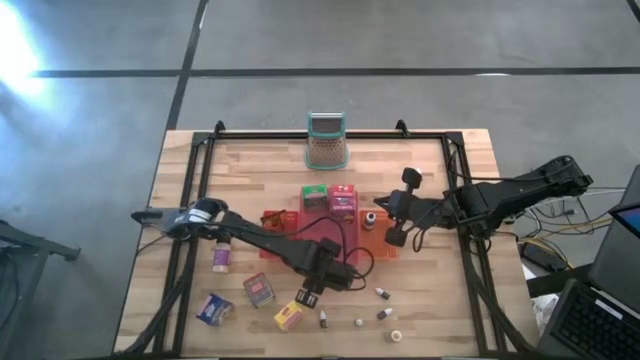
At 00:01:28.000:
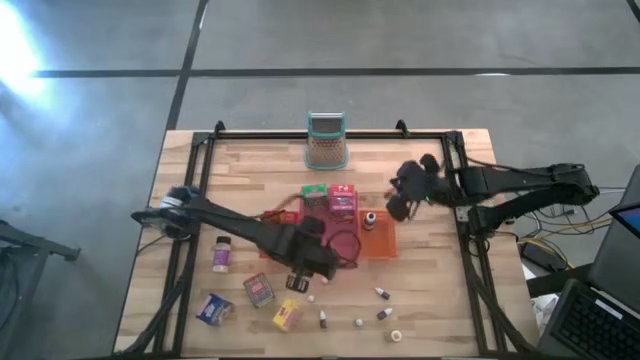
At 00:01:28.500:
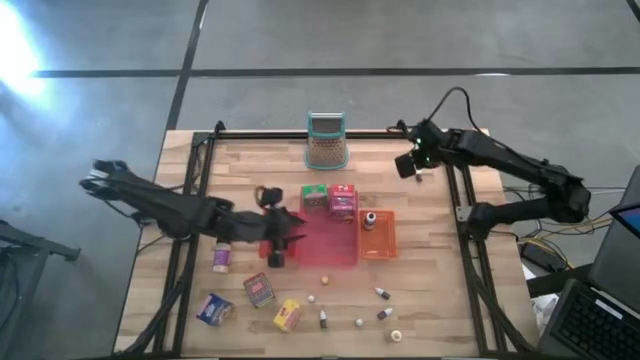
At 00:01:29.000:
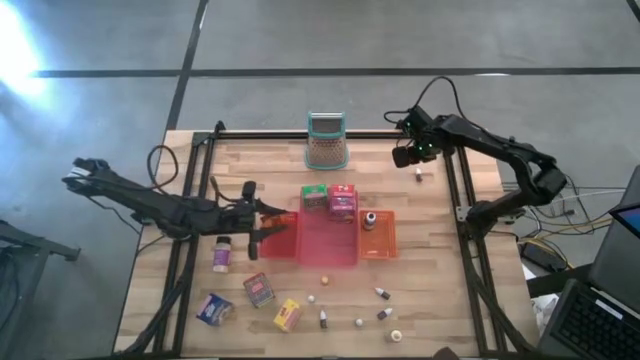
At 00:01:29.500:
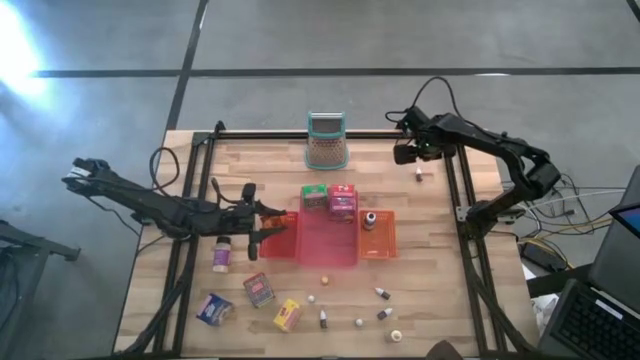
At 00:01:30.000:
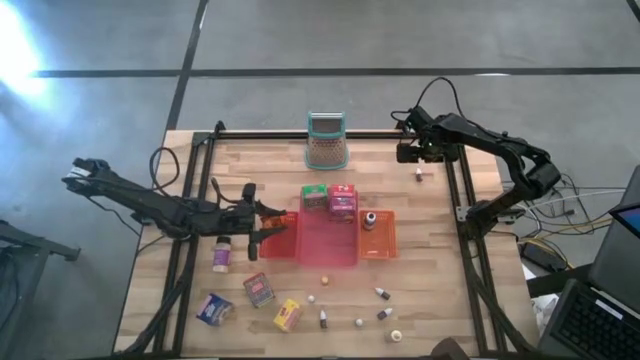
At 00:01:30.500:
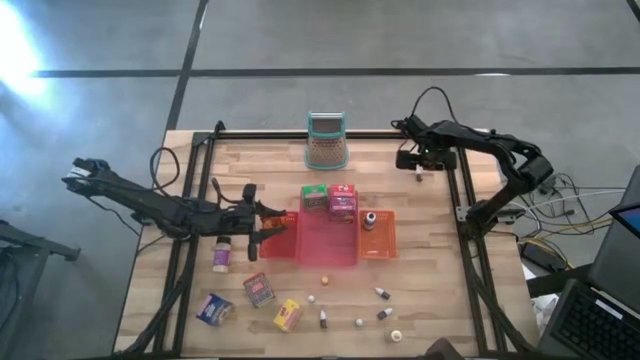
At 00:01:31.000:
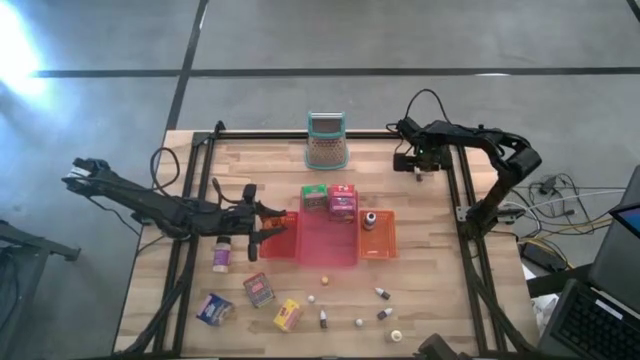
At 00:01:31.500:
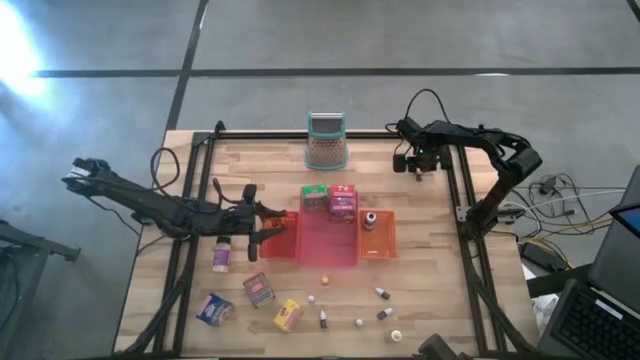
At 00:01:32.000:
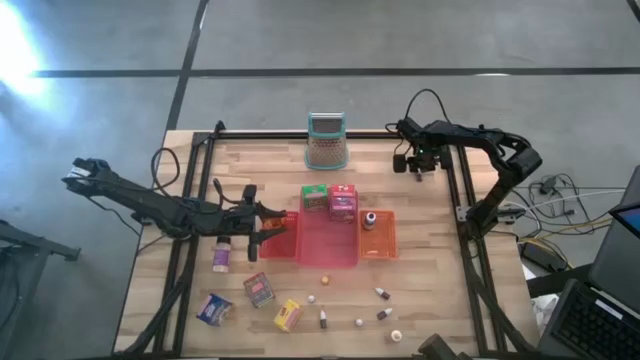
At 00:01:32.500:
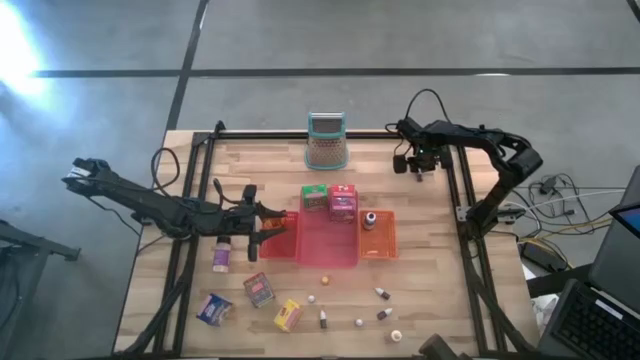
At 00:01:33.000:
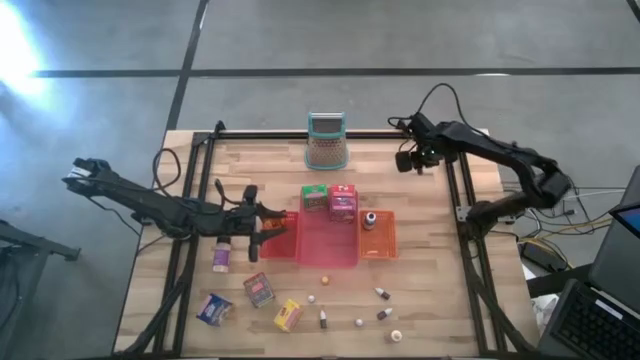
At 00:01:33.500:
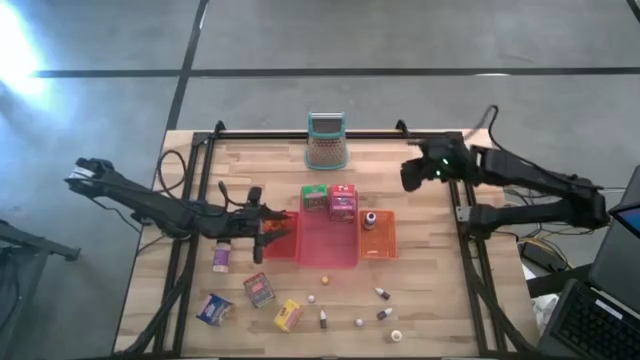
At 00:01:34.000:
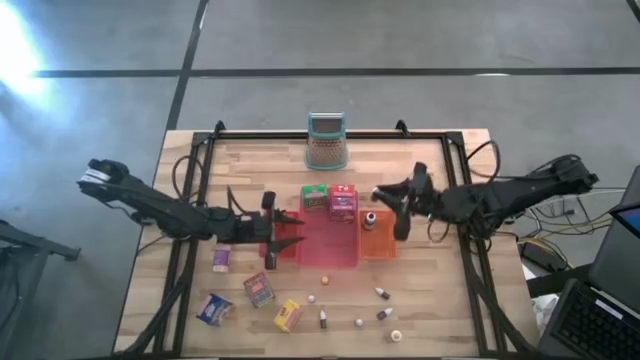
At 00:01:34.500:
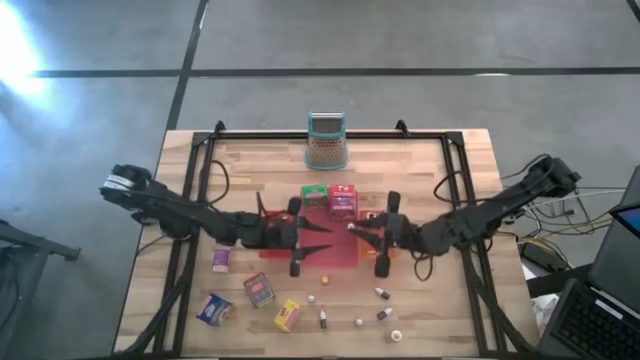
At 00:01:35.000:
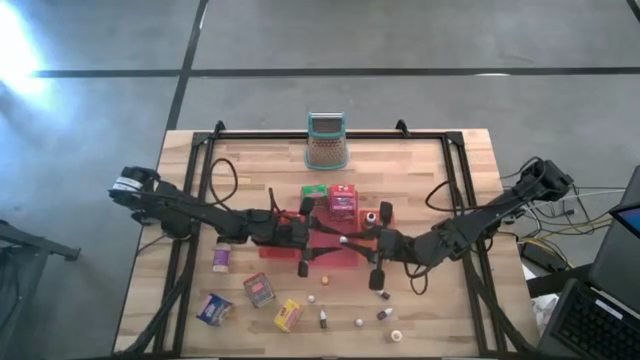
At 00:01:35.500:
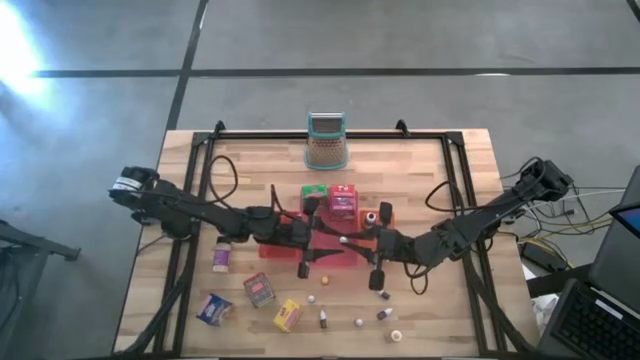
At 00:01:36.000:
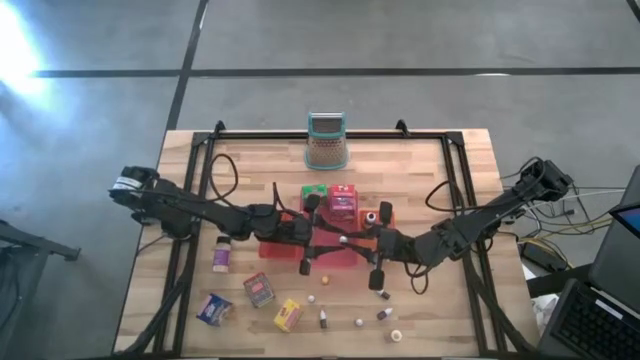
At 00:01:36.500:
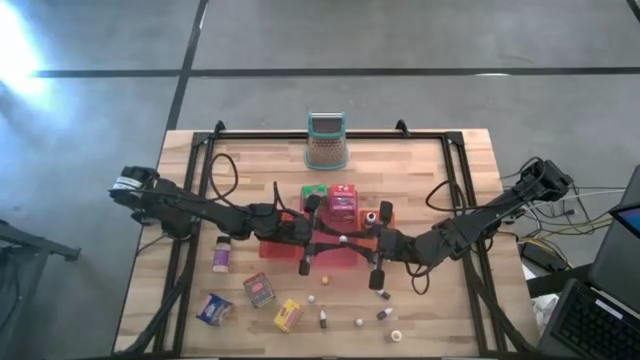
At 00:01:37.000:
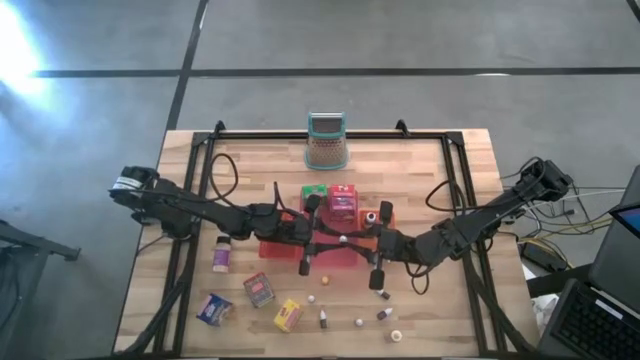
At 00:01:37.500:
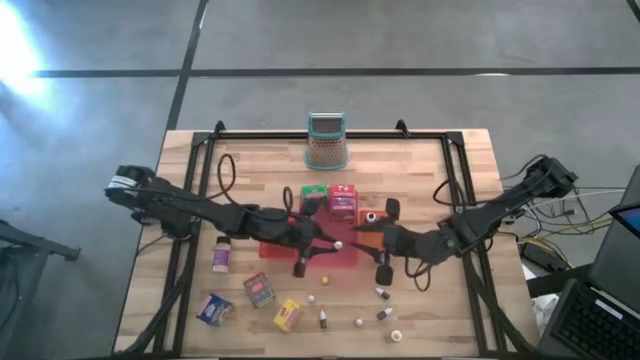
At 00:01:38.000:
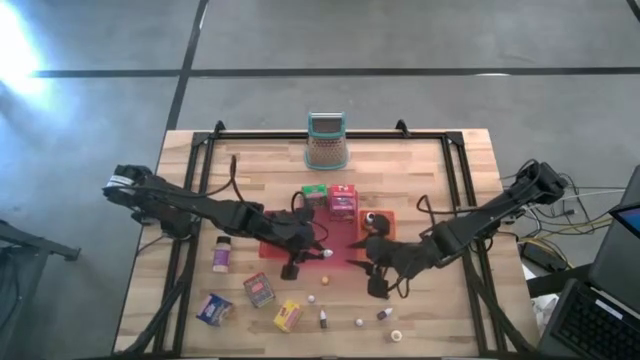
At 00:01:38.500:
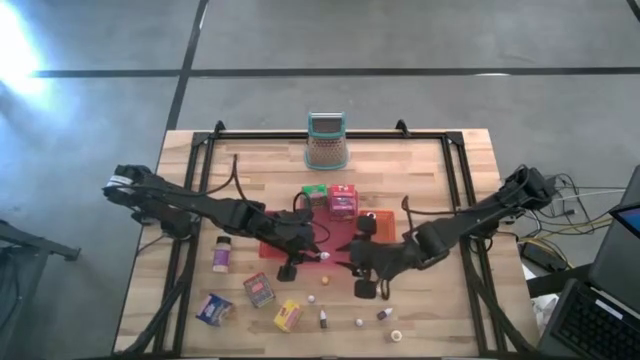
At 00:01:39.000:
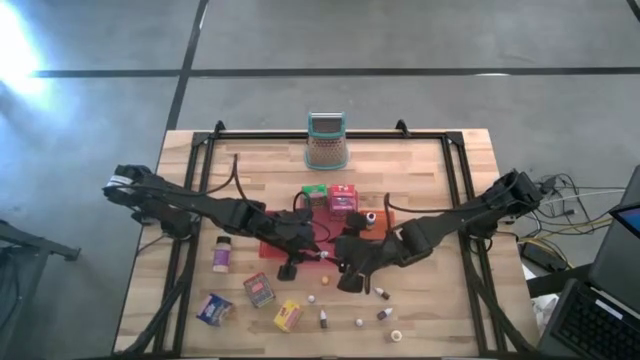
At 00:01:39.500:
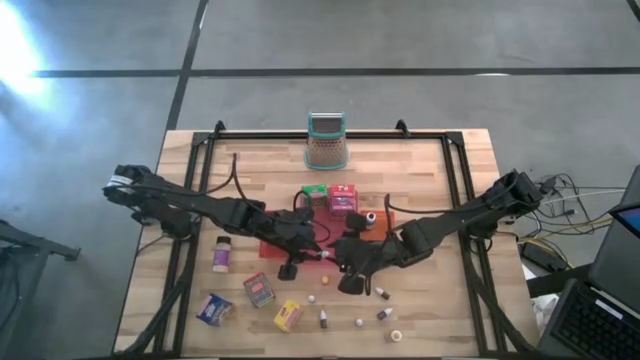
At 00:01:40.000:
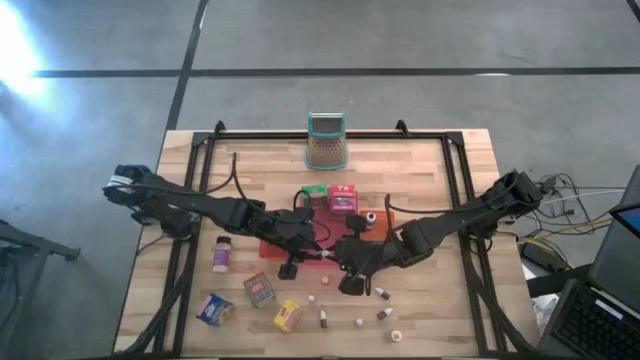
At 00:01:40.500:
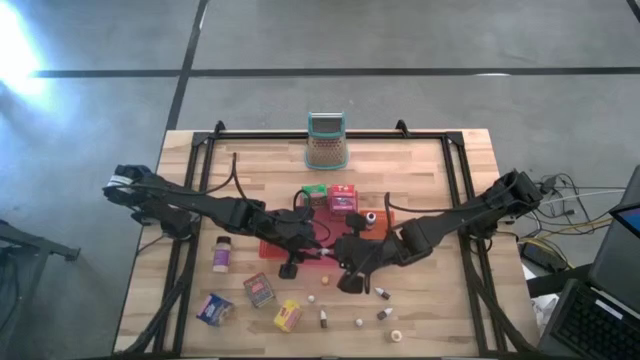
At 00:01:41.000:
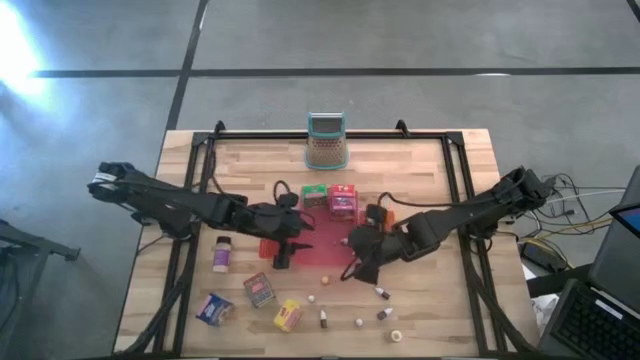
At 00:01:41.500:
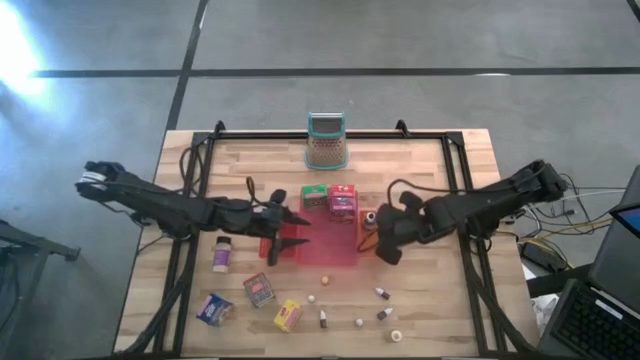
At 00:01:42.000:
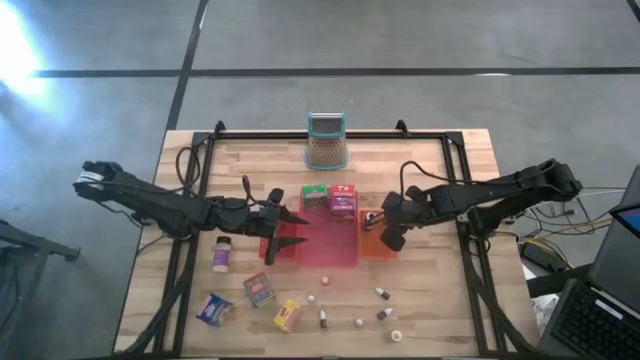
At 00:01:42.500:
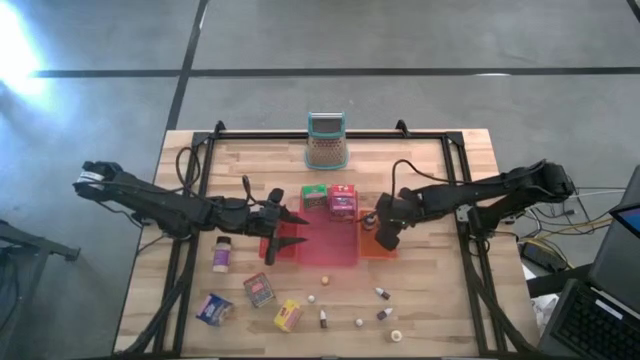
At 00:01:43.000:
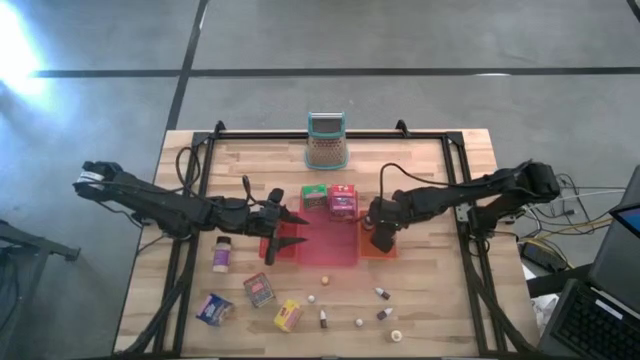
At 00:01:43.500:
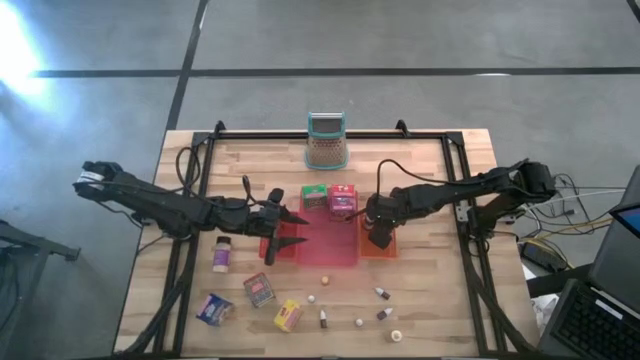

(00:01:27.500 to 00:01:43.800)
Task: Pick & Place Kitchen Items
Put the small orange food coloring bottle into the orange bin

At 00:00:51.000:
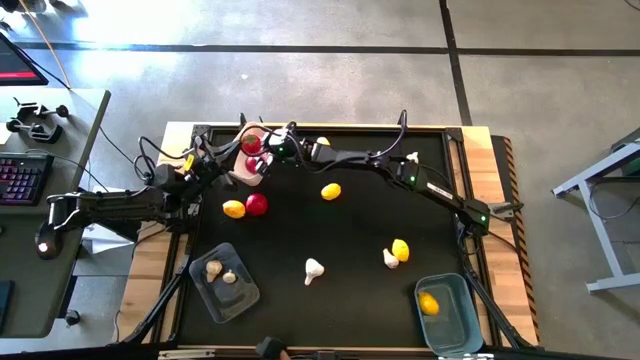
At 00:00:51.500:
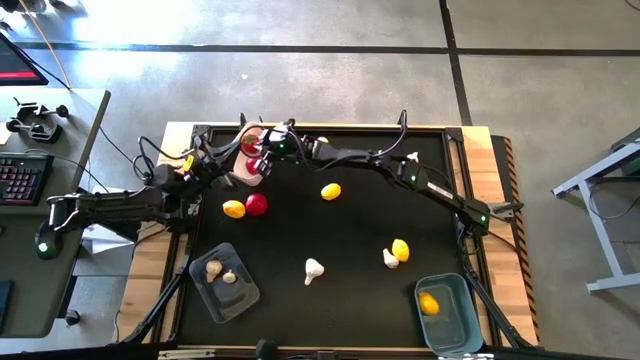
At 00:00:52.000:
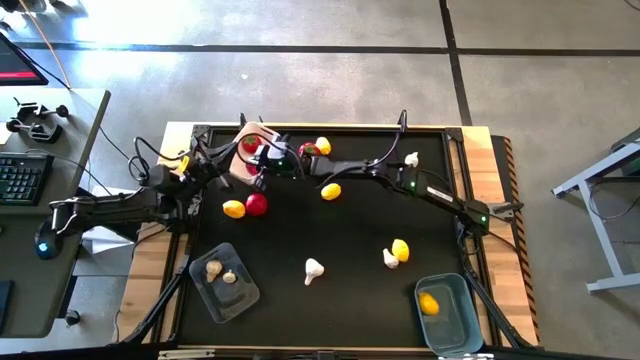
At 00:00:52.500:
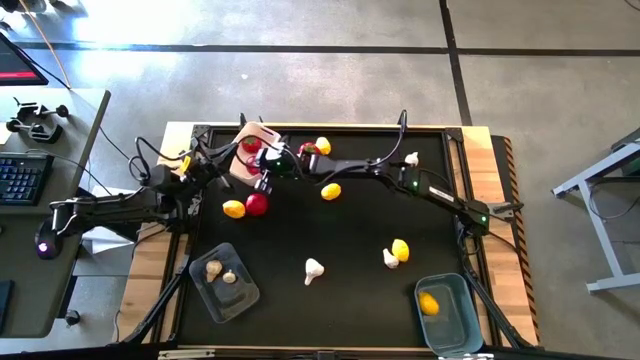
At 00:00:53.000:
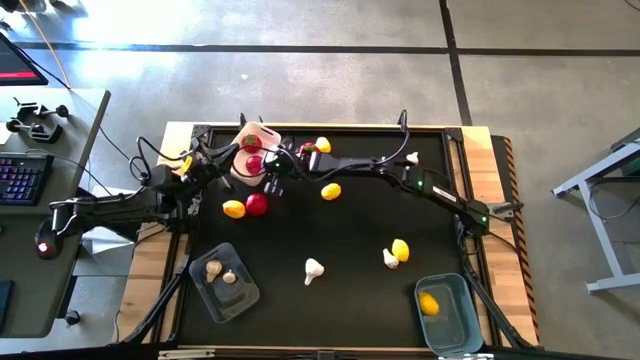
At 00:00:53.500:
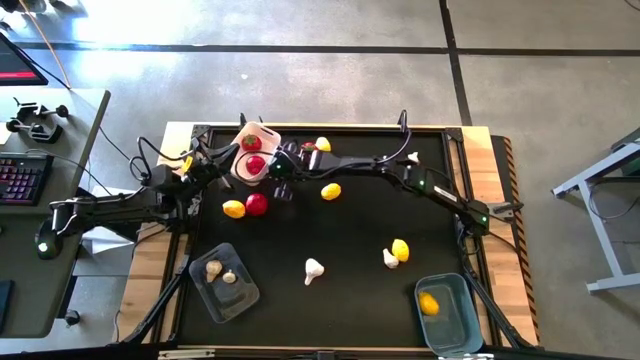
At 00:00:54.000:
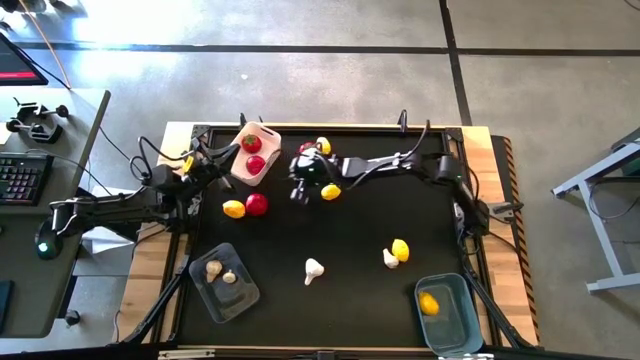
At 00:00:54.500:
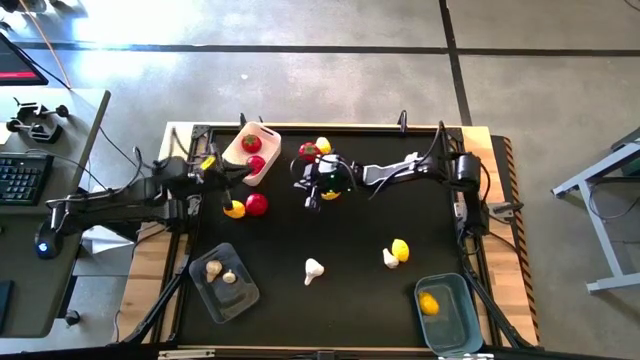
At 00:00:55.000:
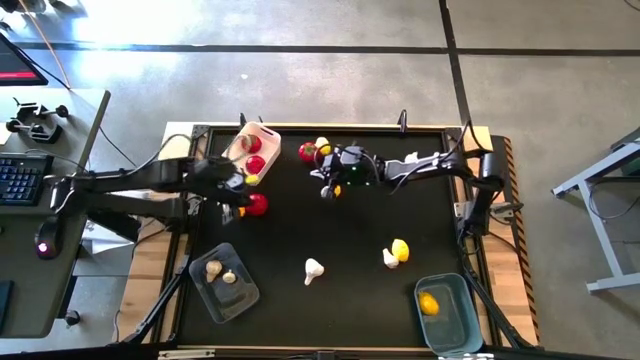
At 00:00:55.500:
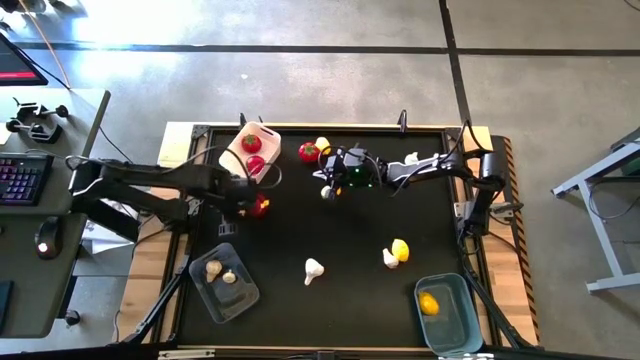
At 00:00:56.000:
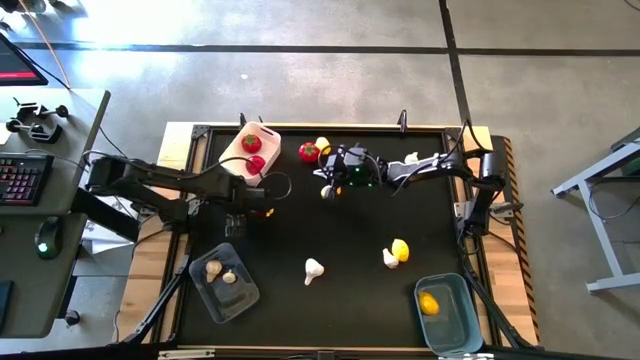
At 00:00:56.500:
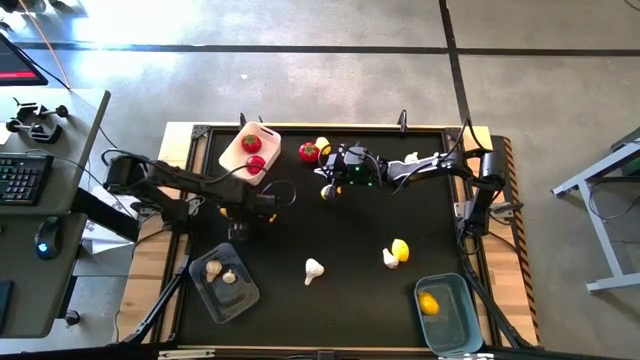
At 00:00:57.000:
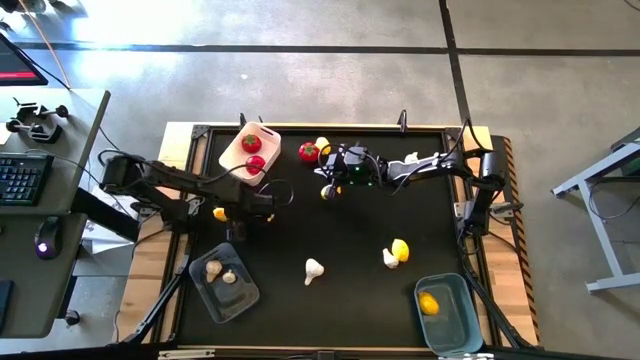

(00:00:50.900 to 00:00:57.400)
Task: Sort produce into baskets
Put the yellow lemon into the blue bin
